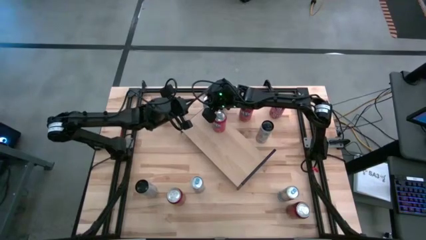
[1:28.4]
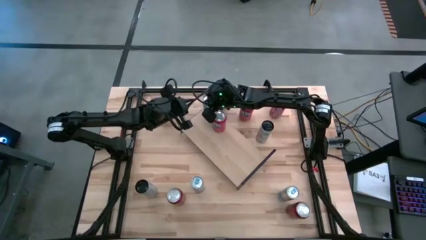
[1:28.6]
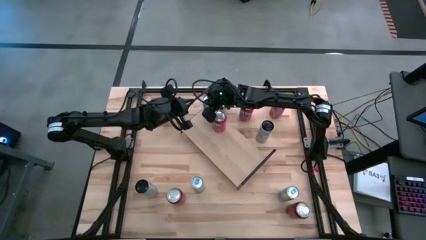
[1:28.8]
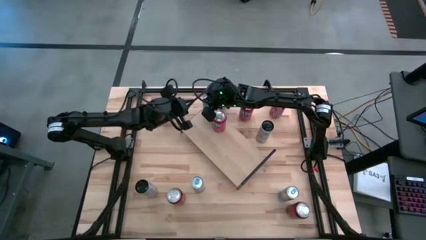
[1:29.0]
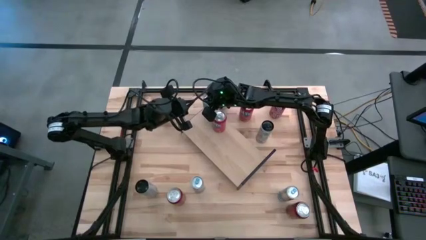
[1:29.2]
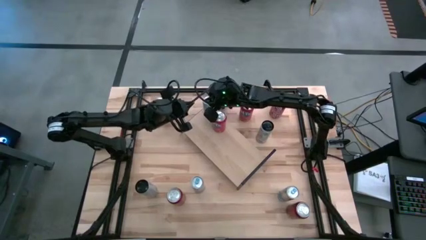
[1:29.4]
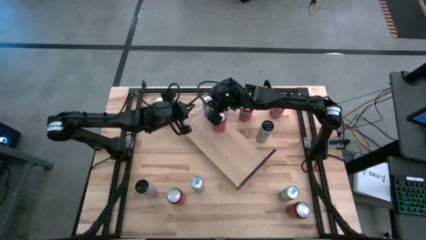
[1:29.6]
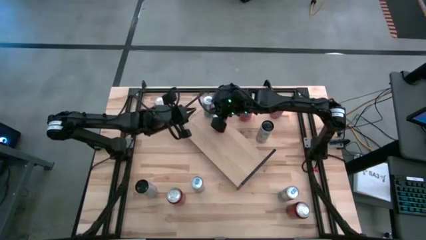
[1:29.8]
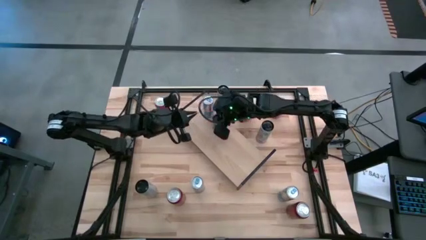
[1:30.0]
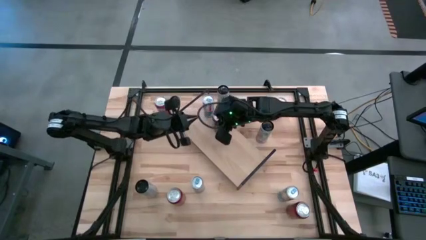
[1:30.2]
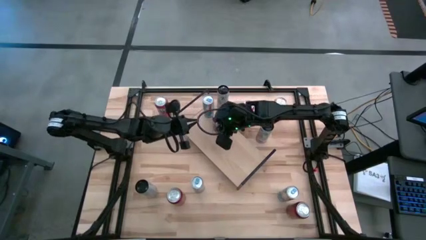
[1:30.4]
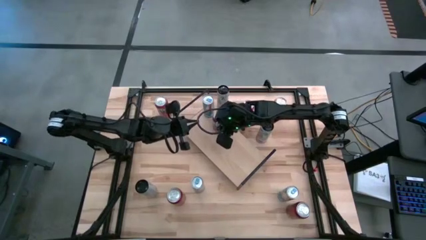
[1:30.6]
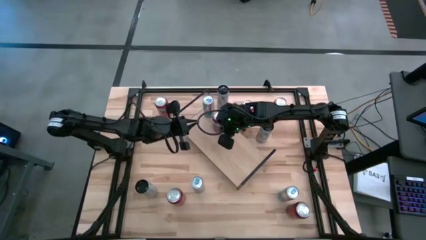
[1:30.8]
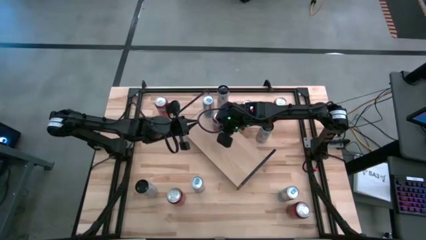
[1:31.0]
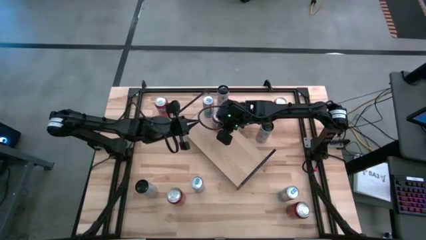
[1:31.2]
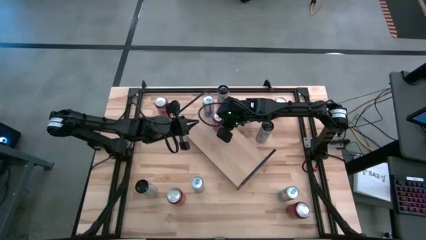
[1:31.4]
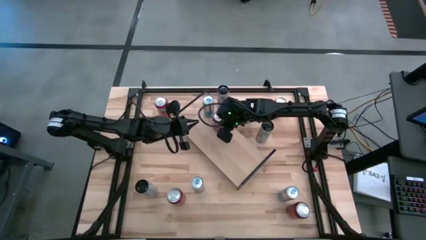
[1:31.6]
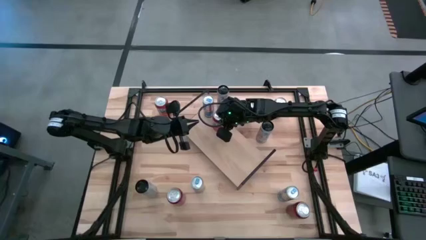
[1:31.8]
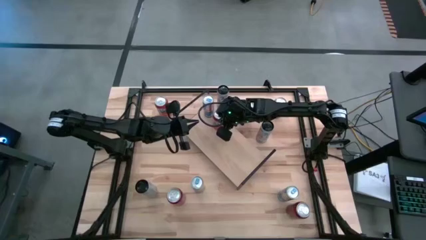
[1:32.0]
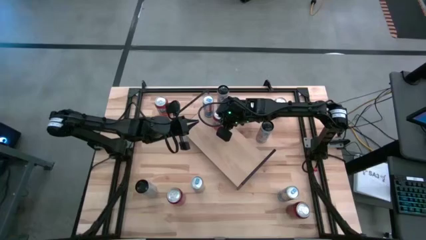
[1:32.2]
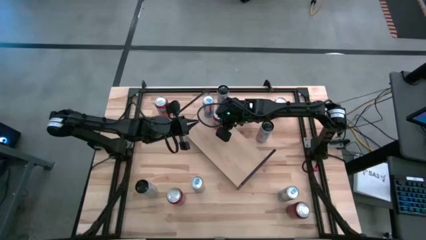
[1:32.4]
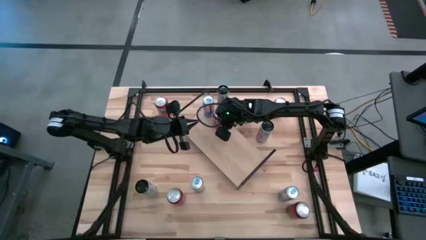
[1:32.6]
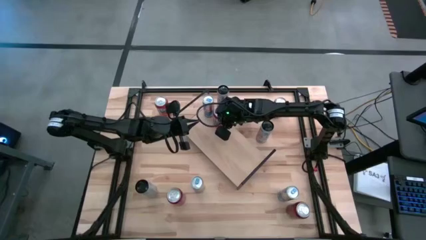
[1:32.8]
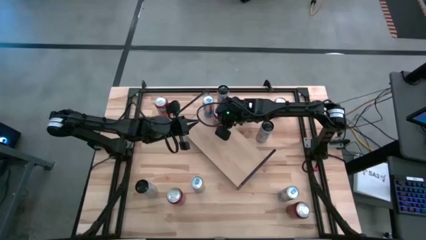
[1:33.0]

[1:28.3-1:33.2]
Task: Place canned beverage on shelf
Adjust the orange soda can

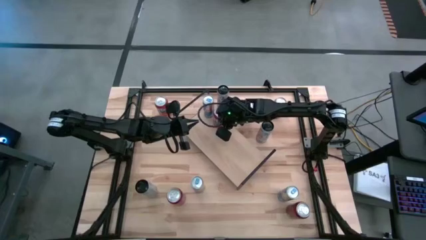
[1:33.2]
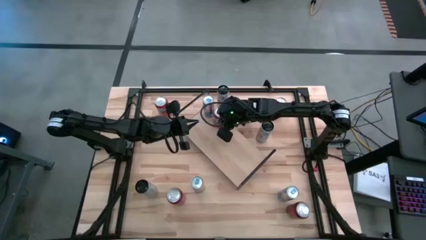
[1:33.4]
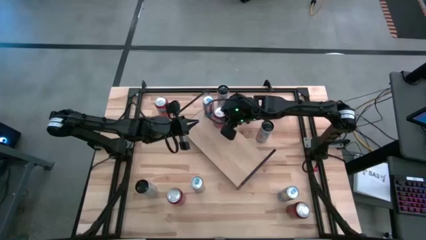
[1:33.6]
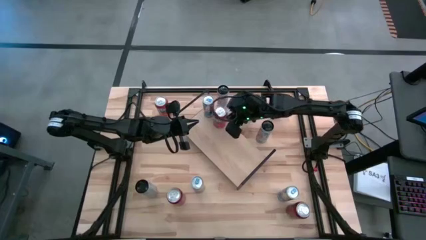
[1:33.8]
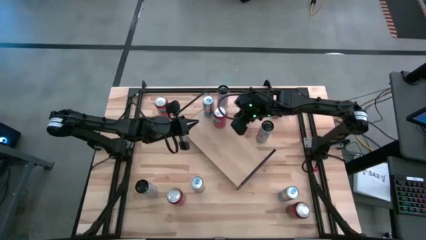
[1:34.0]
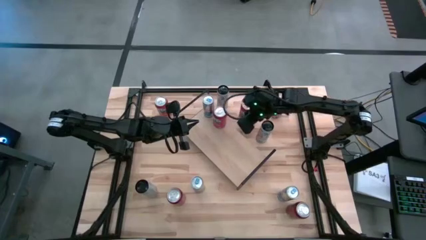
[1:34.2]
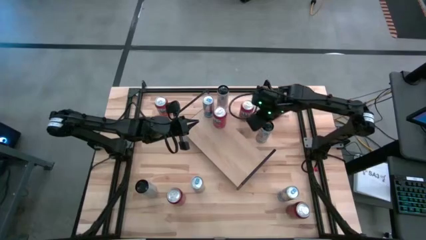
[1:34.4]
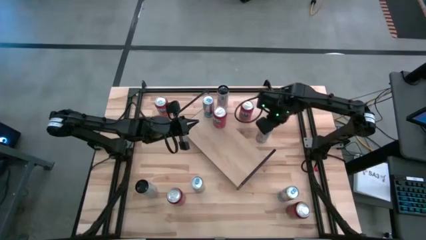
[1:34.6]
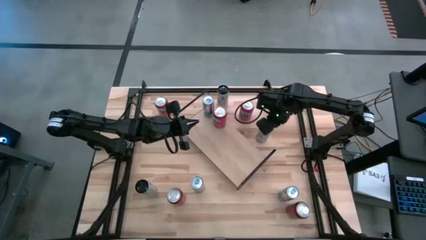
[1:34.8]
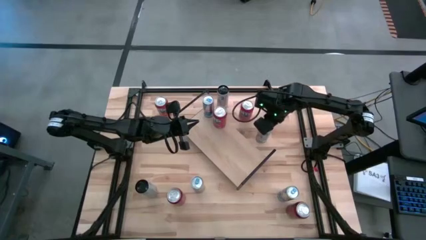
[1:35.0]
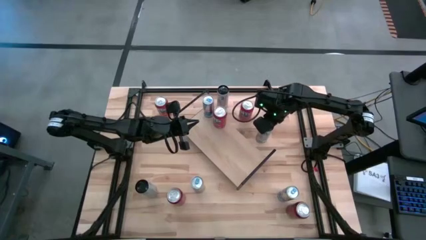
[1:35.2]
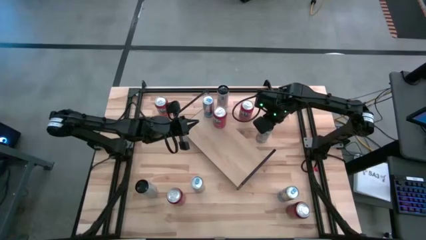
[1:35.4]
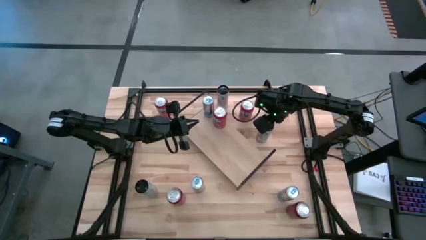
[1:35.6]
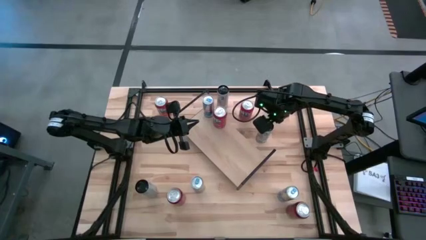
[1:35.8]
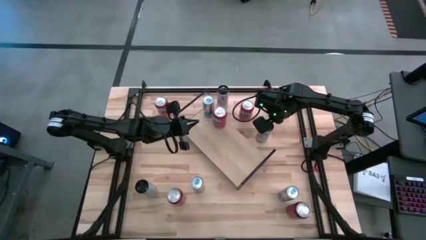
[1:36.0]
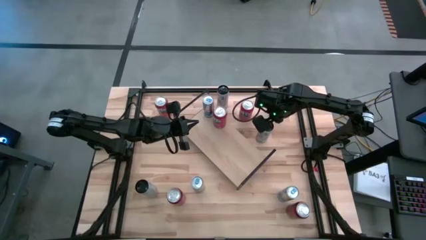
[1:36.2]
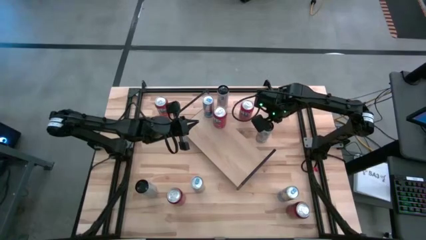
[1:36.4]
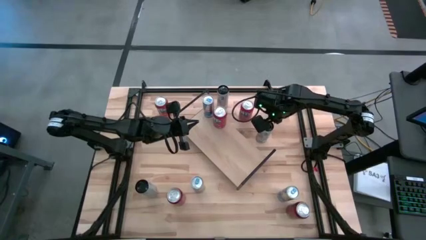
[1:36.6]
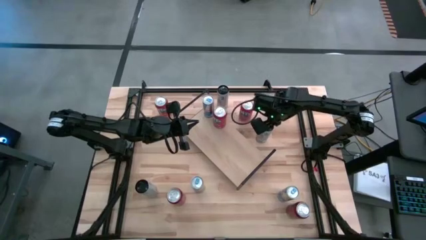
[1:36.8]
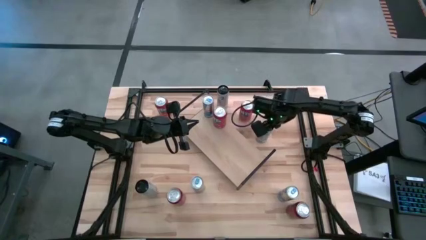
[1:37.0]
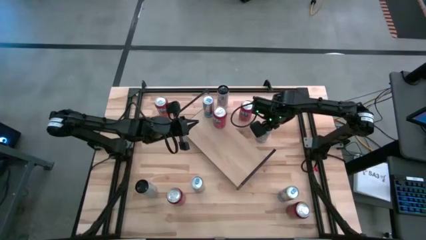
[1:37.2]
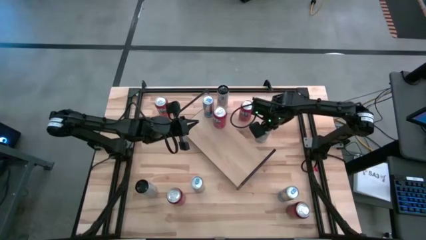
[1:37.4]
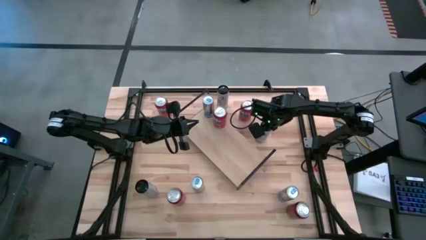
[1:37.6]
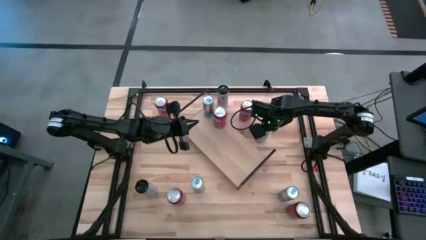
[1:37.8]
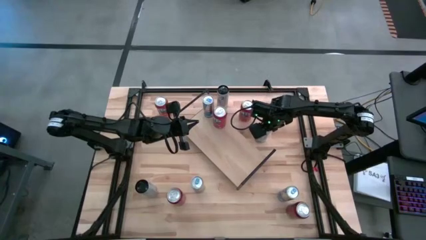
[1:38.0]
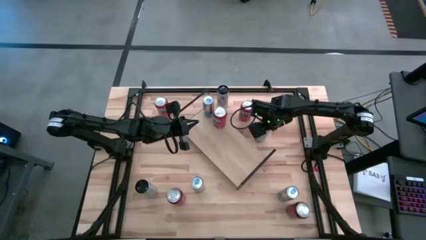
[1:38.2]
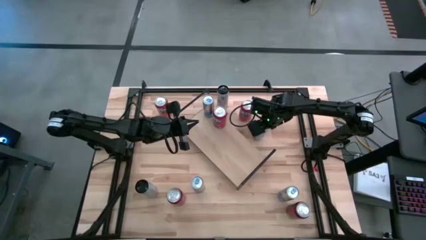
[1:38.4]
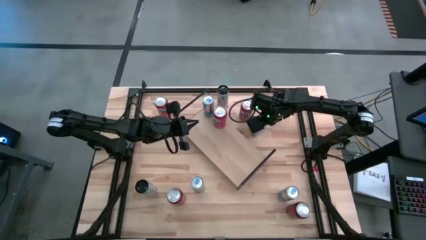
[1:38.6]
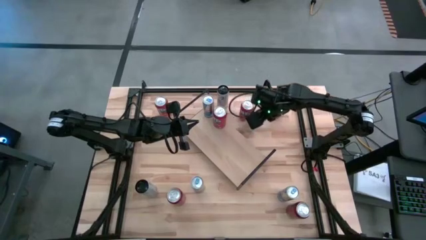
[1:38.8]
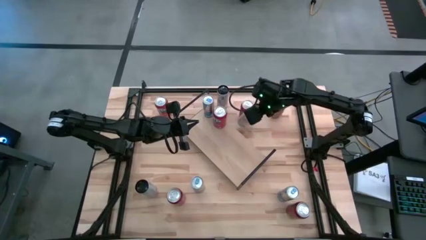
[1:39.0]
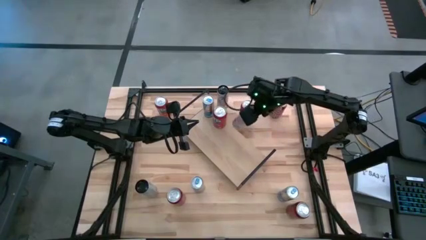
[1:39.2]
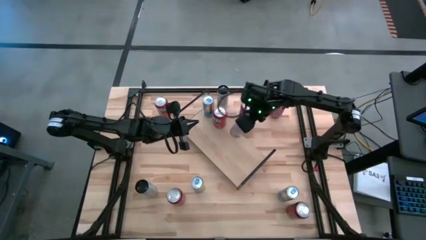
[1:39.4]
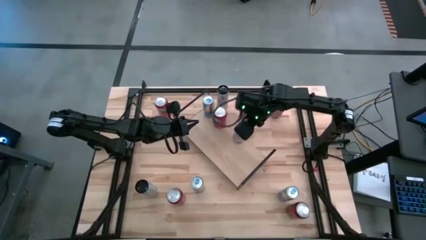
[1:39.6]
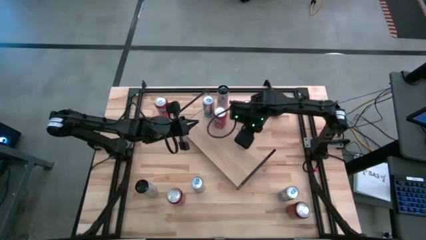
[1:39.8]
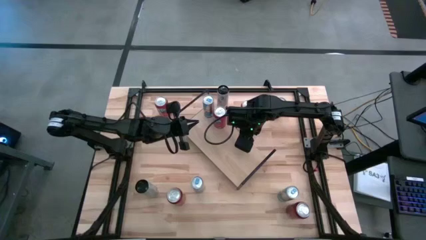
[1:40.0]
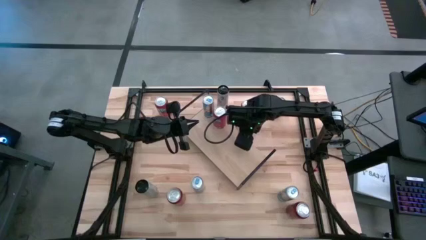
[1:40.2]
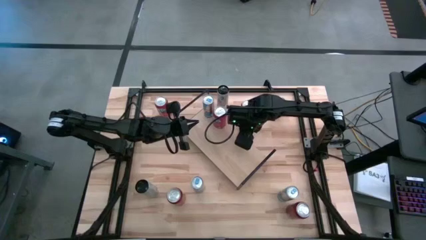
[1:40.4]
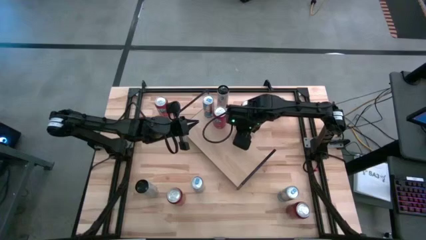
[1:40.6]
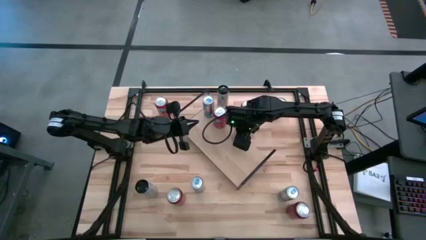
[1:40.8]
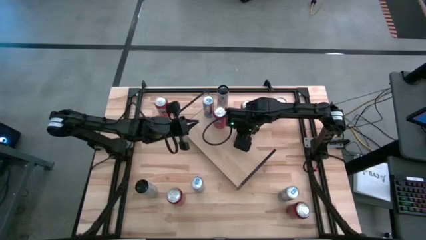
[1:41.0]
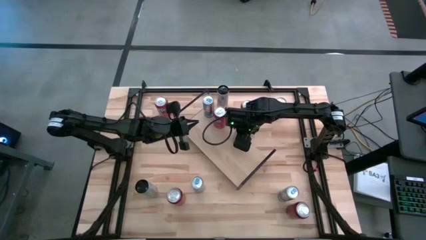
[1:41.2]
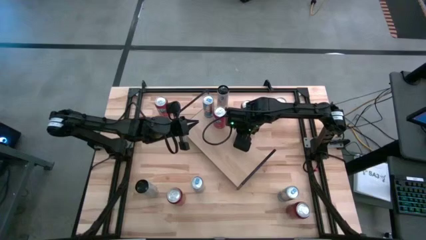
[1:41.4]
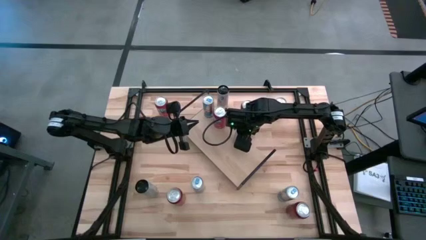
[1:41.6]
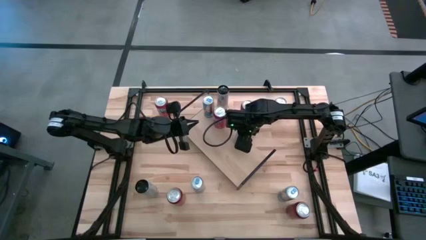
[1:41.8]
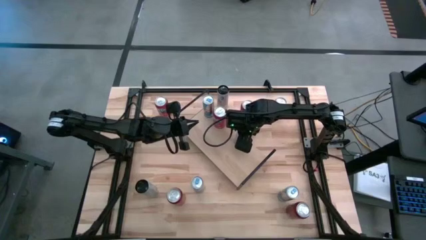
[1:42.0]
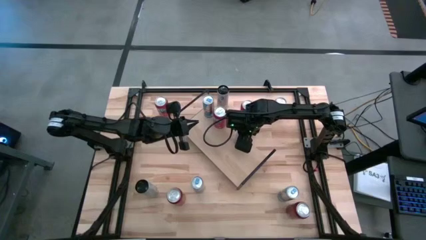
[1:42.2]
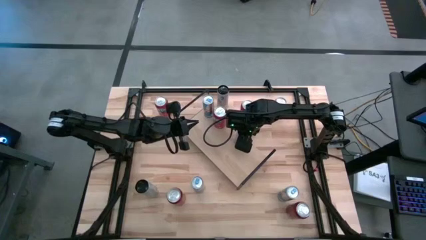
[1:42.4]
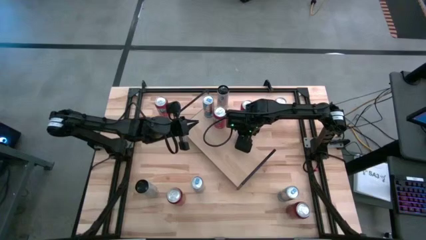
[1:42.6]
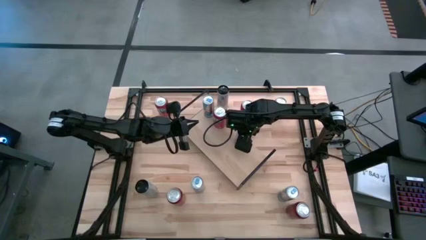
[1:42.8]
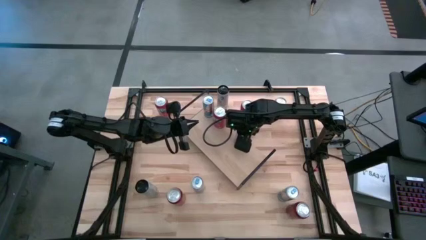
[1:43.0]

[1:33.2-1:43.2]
Put the right pink soda can on the shelf
